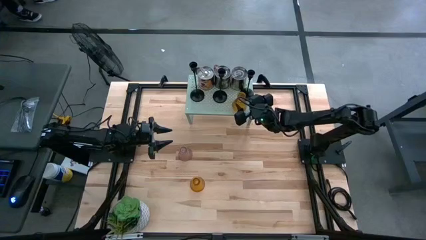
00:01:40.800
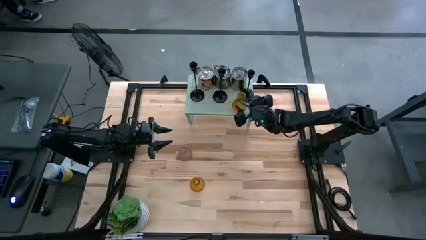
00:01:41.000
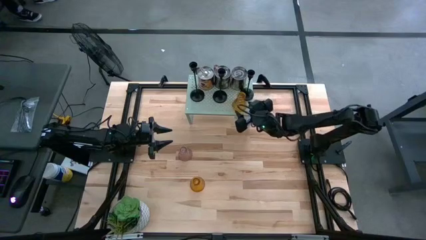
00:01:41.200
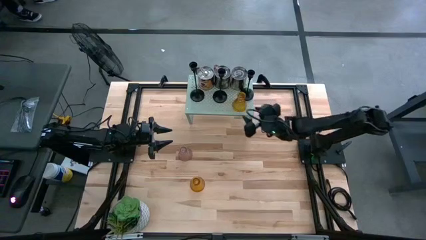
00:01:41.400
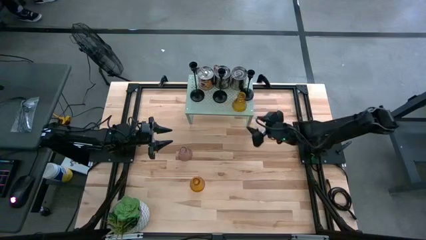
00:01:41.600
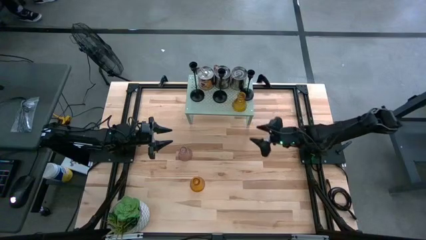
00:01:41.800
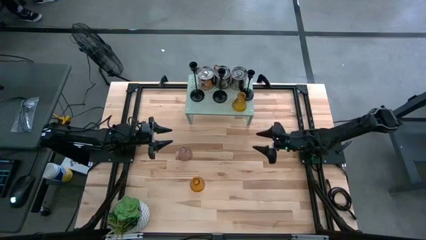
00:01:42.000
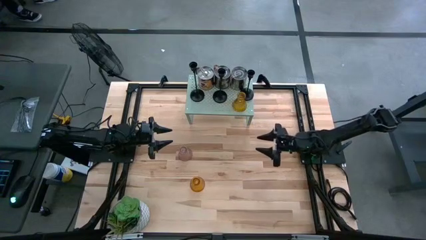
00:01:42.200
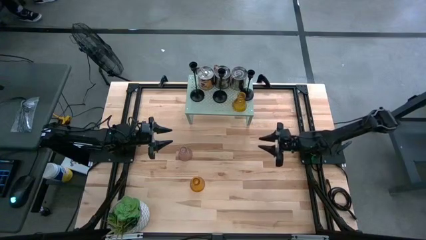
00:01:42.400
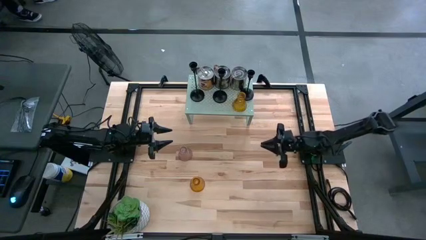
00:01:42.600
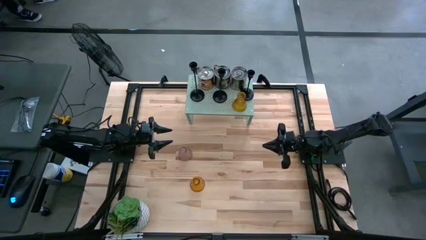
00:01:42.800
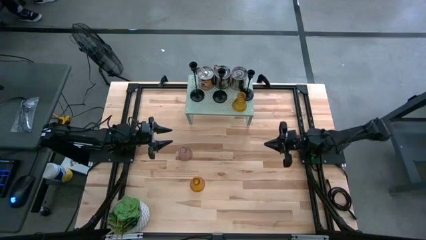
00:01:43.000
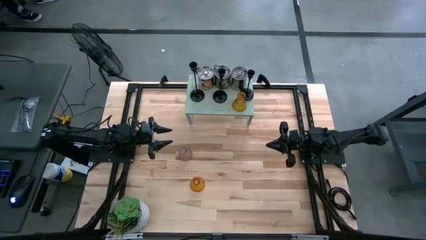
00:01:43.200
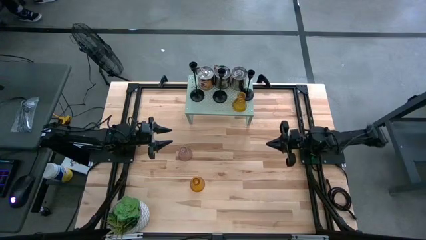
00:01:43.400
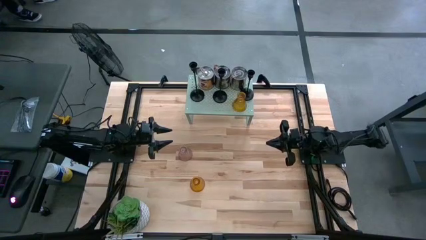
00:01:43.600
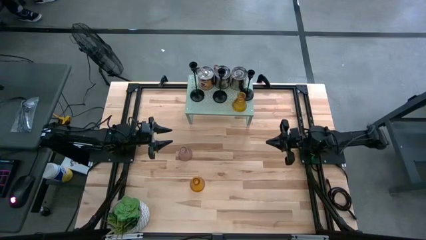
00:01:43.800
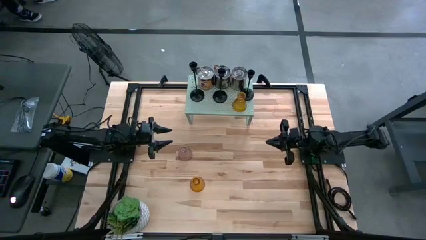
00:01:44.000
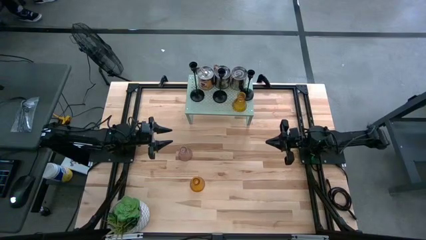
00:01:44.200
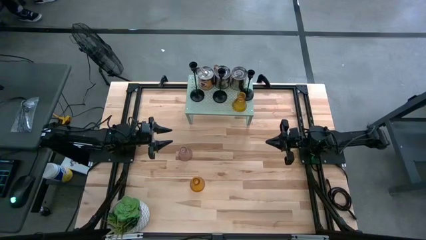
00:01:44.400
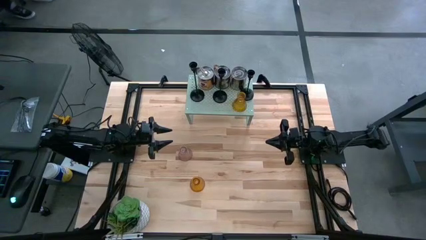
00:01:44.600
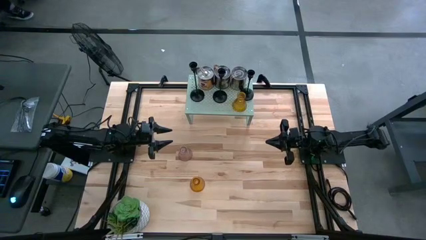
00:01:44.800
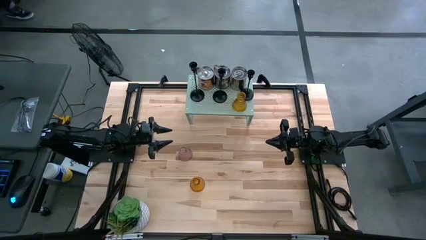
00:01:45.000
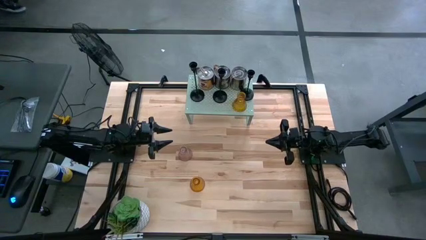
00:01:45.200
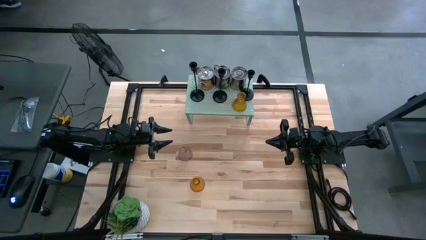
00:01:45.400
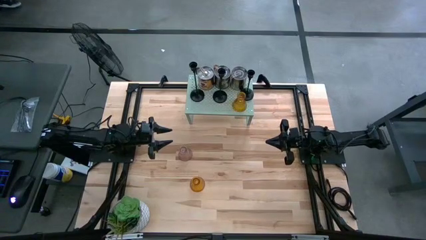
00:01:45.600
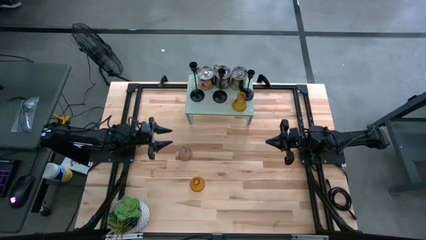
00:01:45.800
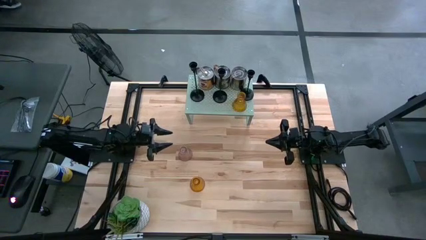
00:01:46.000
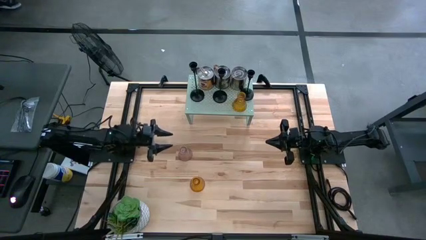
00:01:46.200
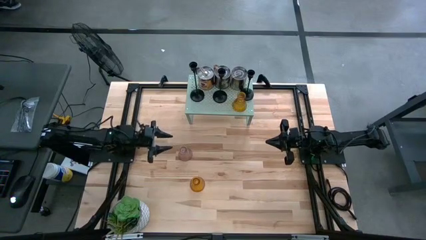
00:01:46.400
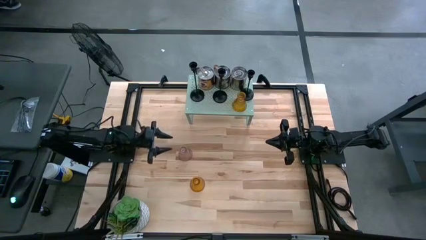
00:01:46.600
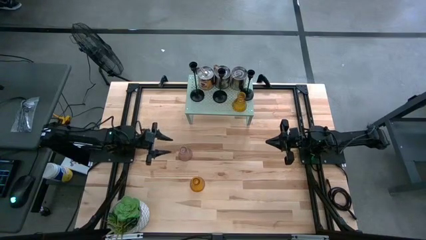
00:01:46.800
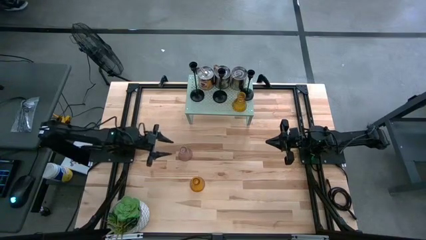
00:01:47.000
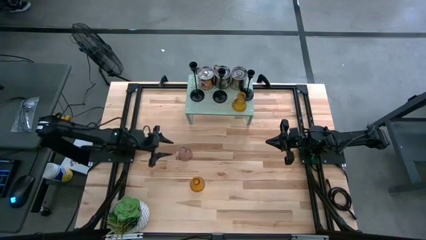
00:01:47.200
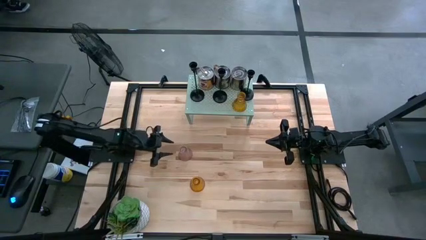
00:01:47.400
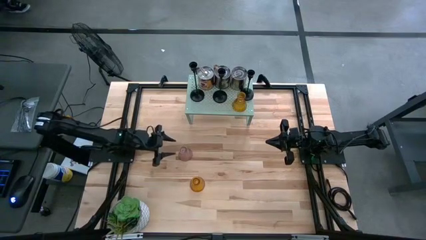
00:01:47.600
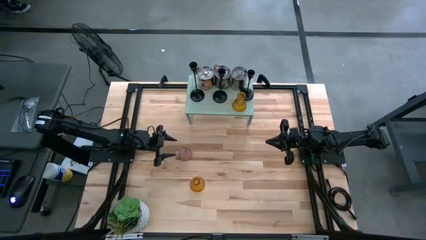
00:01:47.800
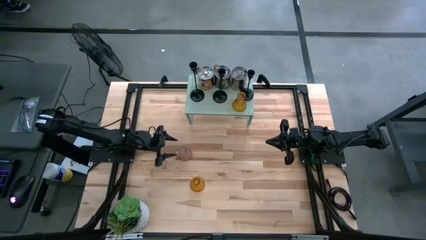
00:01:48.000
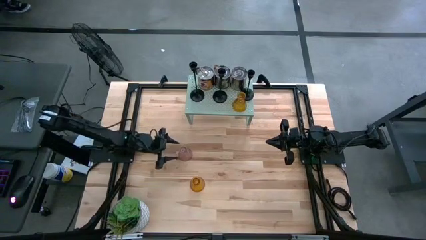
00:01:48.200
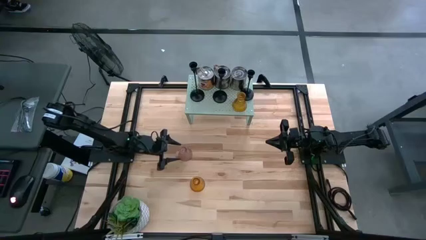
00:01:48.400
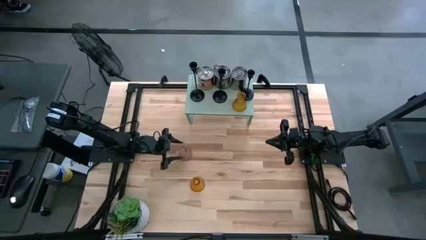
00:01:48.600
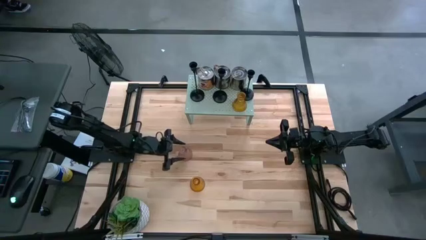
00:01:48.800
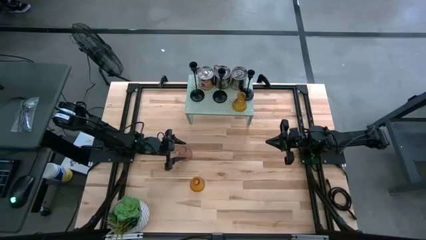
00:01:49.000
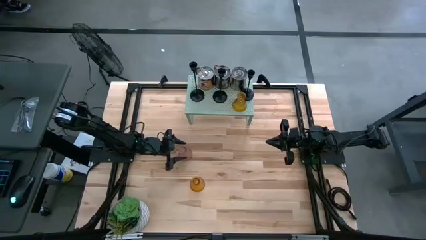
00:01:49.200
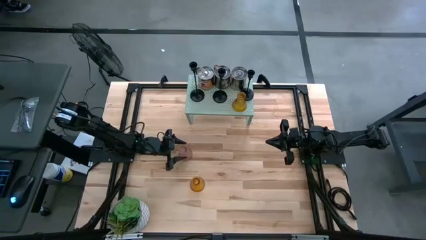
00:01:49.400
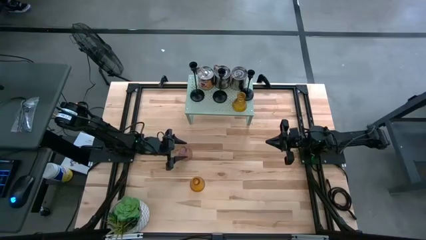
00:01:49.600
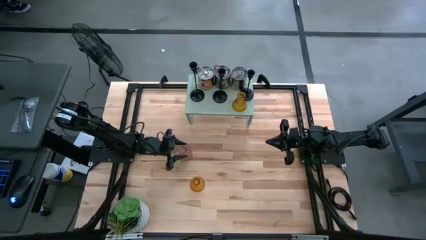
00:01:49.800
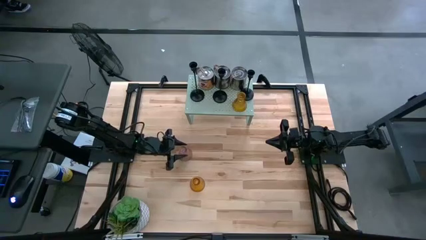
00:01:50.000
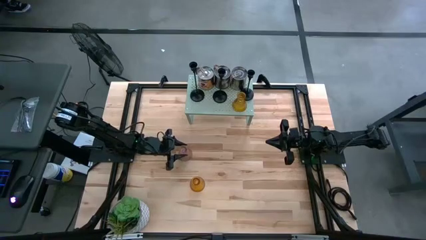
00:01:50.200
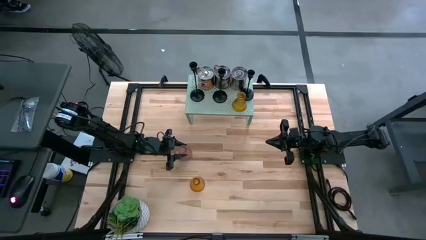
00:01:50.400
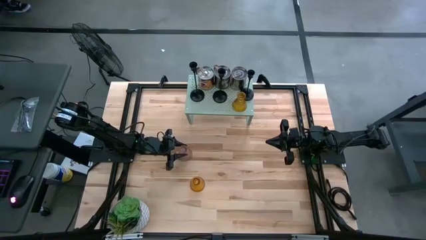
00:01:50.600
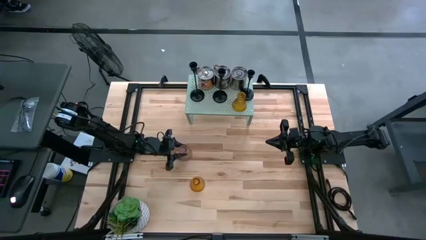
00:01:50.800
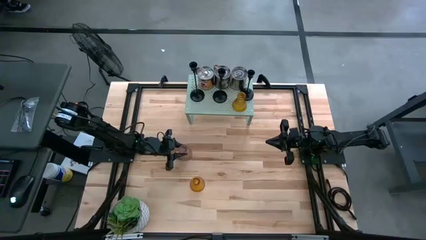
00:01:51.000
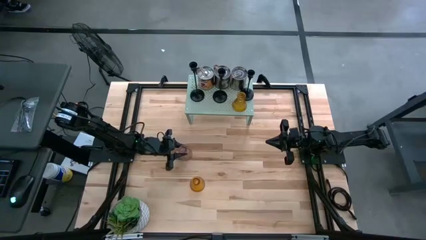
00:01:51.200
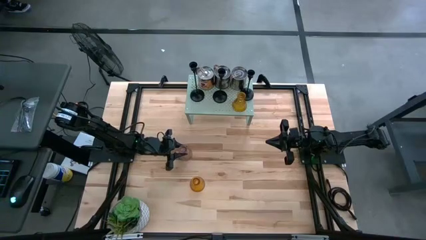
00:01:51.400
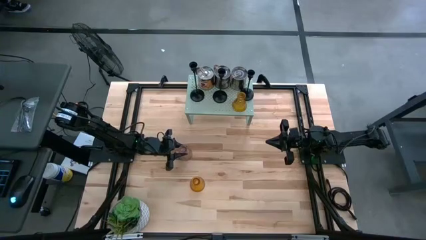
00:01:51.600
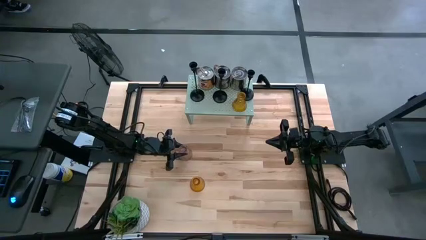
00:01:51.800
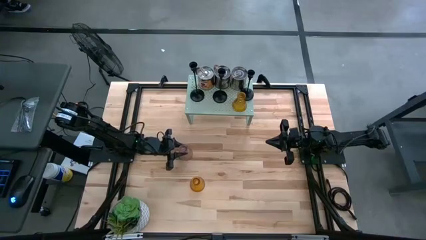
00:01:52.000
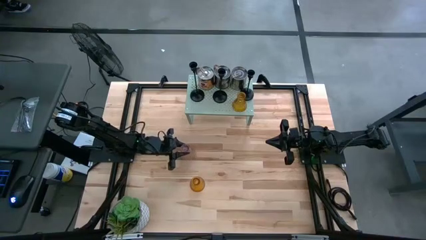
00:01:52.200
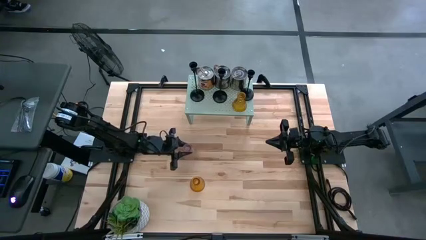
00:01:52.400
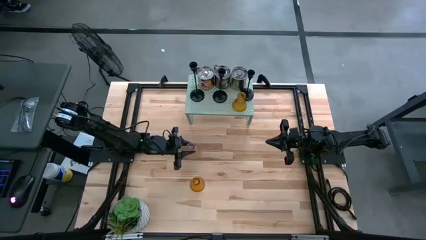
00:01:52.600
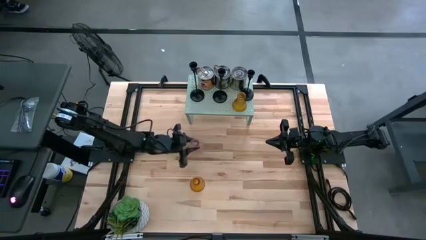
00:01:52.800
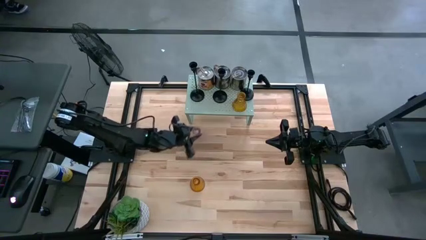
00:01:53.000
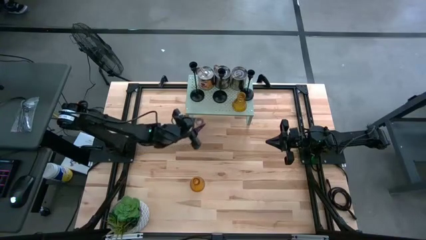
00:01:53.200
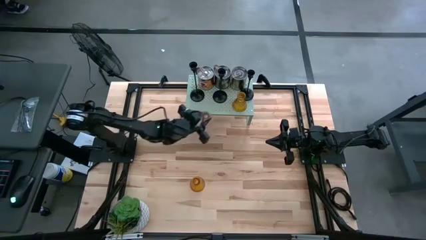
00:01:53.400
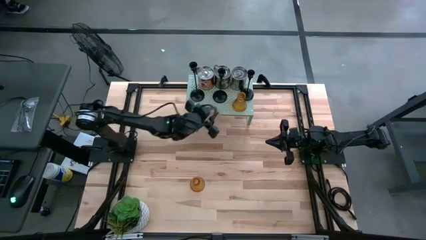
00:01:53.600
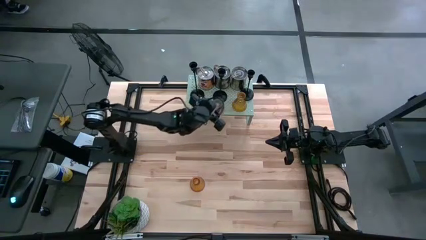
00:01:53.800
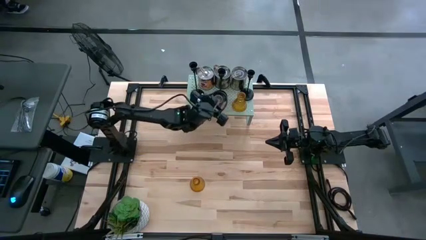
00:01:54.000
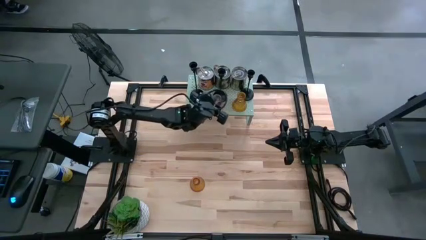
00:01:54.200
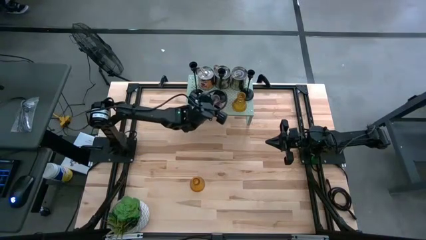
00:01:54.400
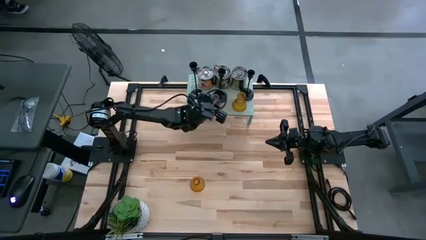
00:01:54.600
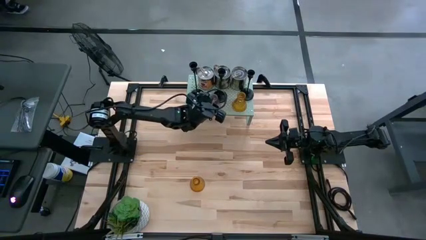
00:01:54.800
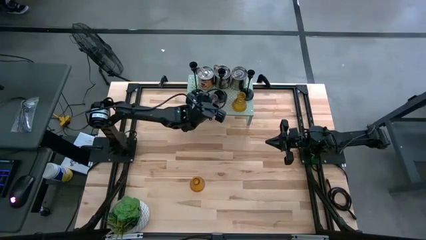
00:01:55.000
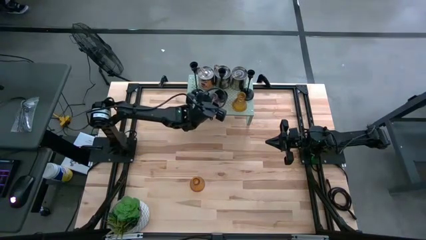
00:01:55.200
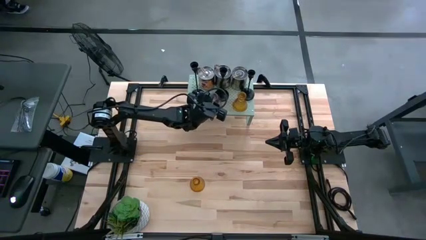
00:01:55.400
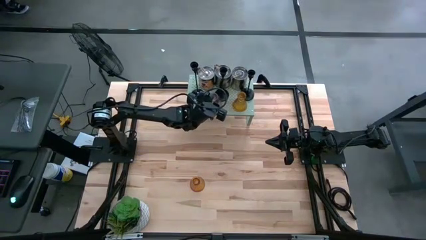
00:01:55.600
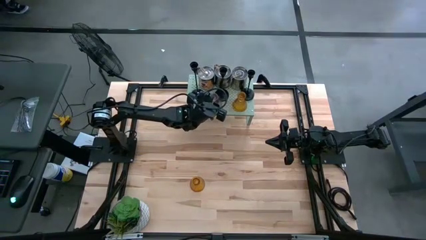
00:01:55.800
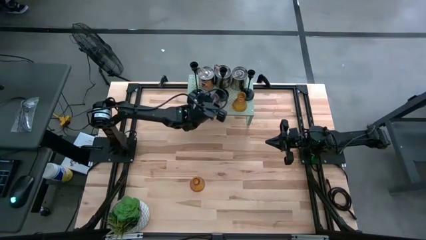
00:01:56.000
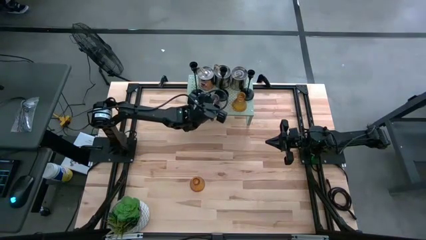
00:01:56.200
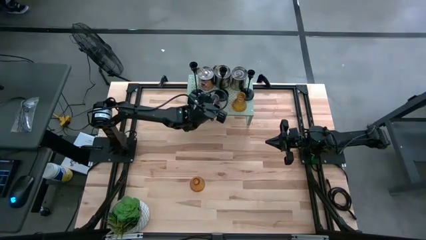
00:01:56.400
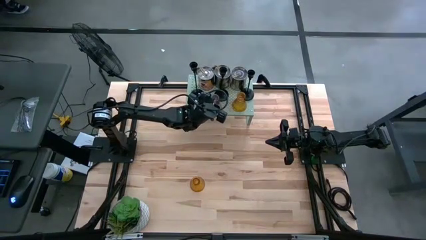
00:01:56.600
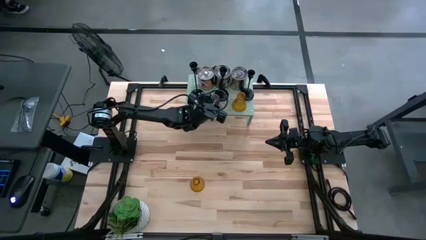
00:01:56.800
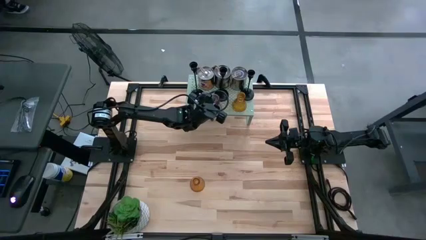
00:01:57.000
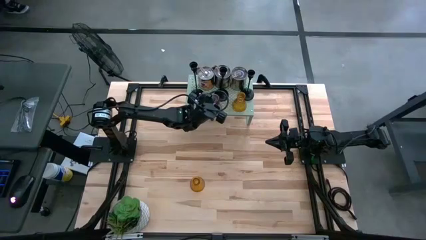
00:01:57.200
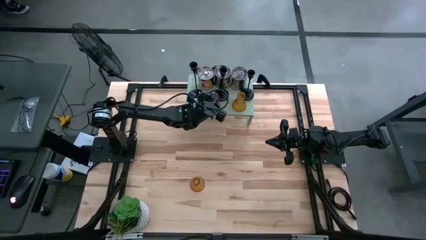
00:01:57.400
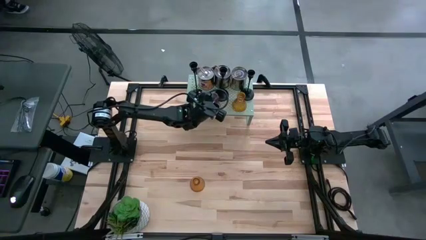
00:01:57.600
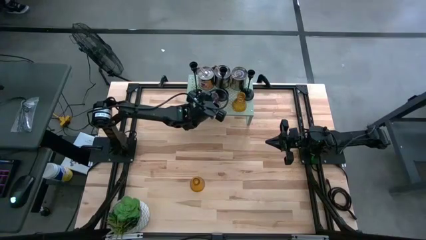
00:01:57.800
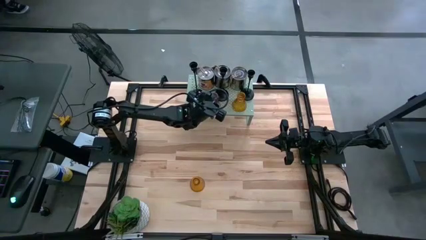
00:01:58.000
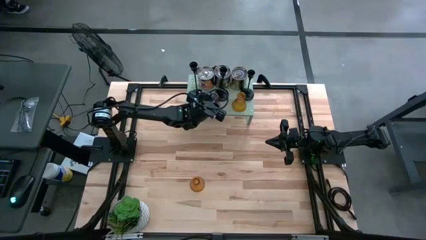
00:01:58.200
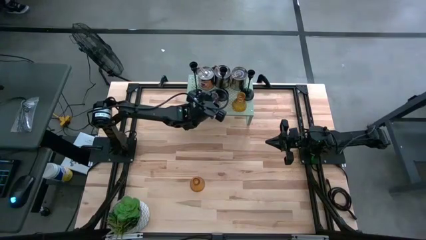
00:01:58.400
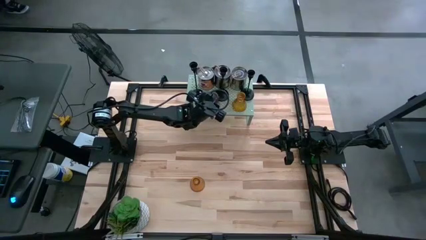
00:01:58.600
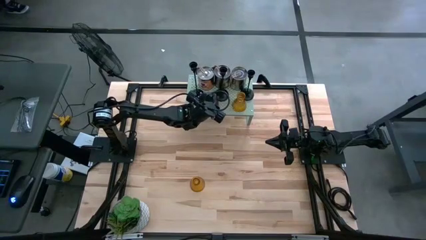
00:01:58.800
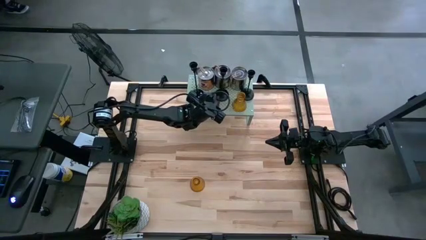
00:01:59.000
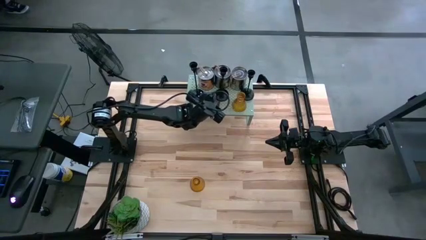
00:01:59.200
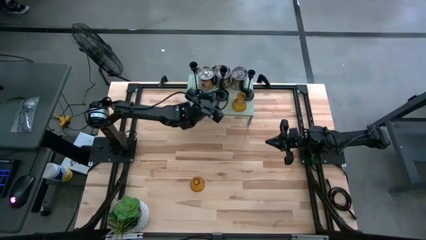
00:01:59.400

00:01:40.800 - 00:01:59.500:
Task: Pick & Place candle stick holders
Put the pink candle holder on the shelf
